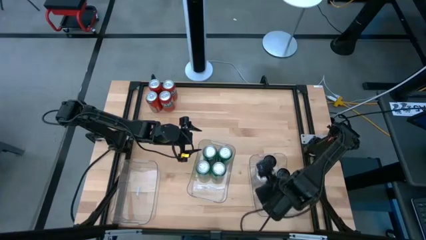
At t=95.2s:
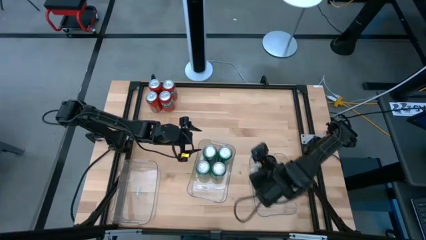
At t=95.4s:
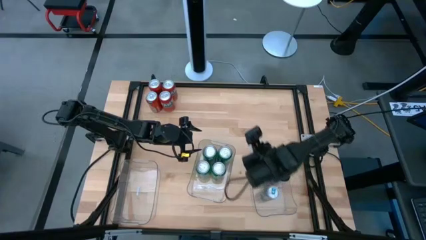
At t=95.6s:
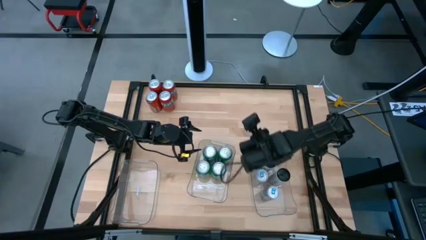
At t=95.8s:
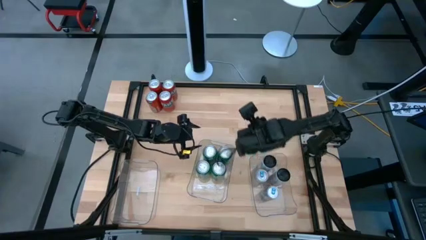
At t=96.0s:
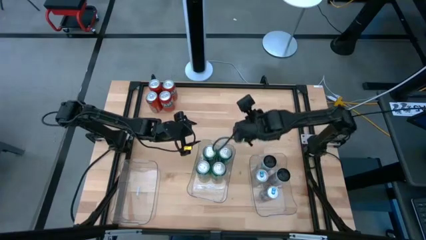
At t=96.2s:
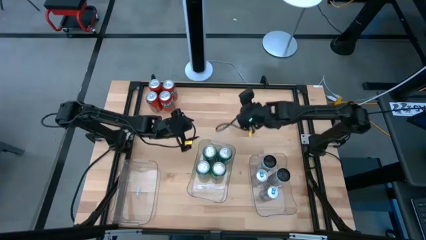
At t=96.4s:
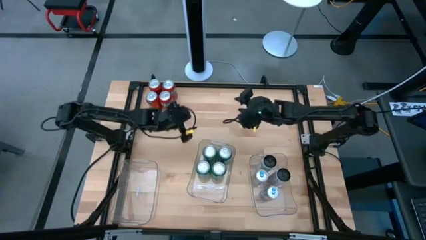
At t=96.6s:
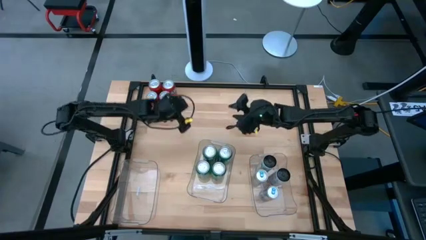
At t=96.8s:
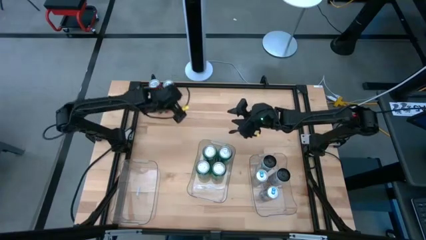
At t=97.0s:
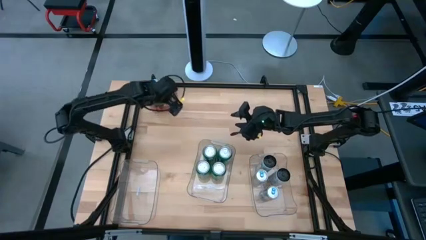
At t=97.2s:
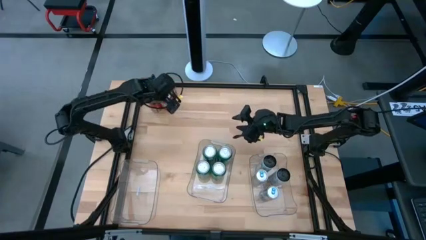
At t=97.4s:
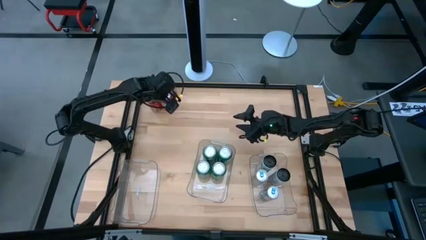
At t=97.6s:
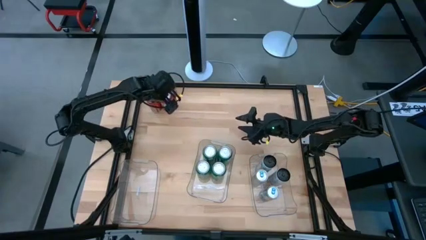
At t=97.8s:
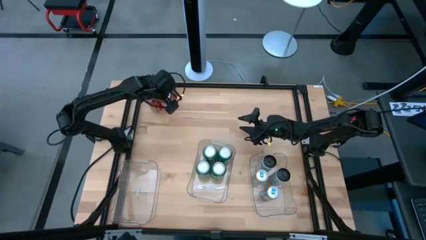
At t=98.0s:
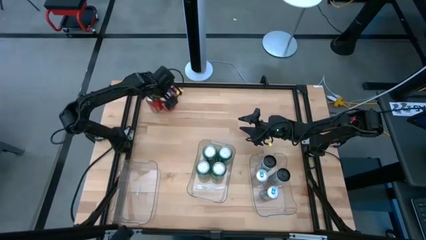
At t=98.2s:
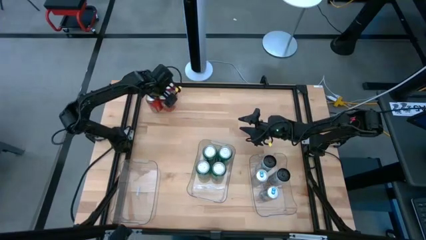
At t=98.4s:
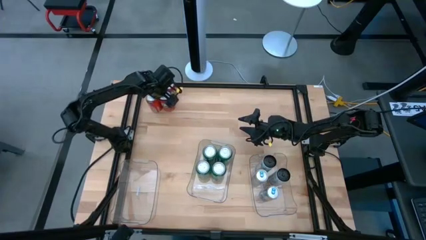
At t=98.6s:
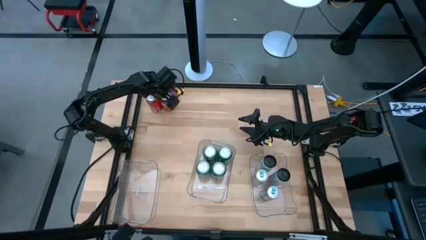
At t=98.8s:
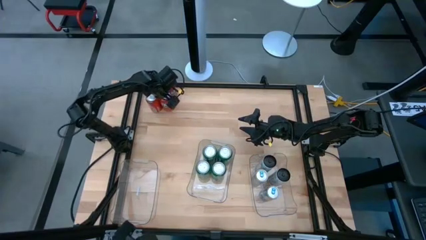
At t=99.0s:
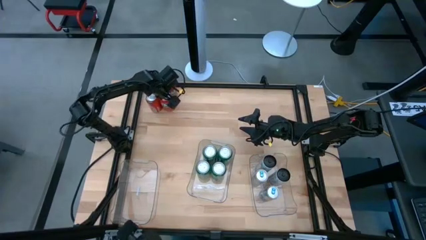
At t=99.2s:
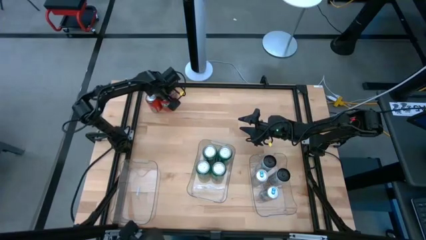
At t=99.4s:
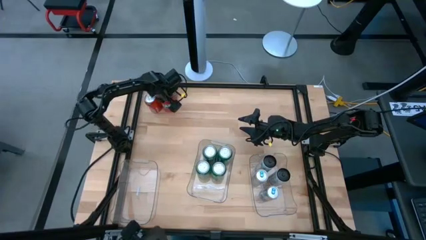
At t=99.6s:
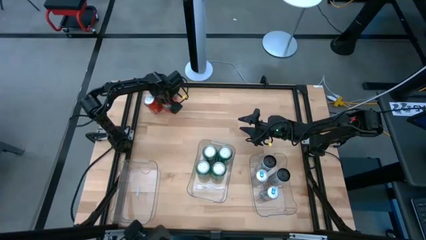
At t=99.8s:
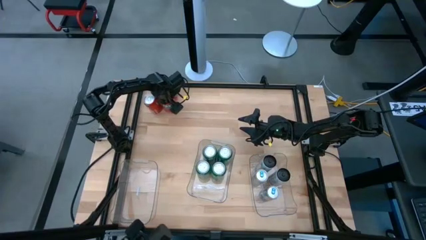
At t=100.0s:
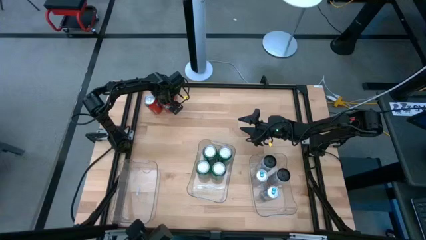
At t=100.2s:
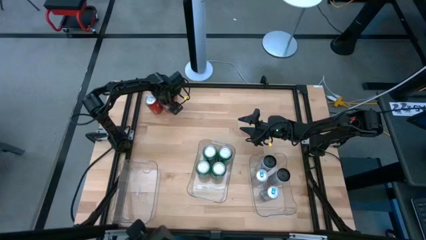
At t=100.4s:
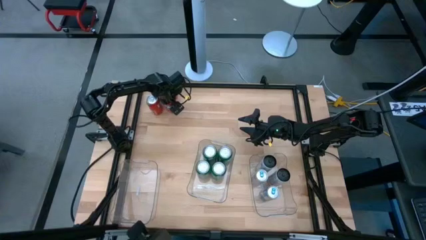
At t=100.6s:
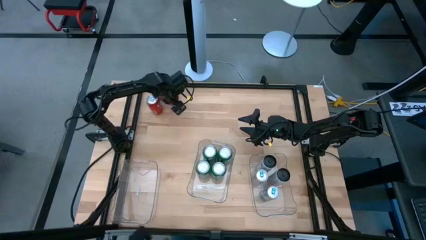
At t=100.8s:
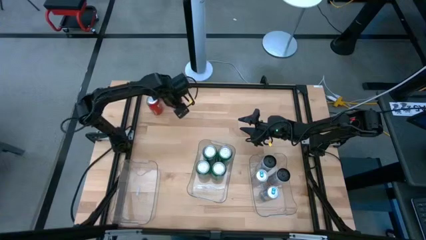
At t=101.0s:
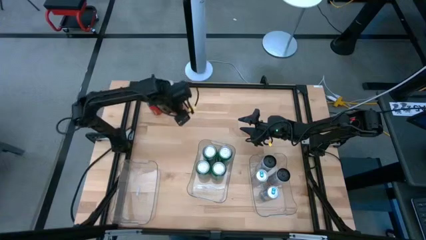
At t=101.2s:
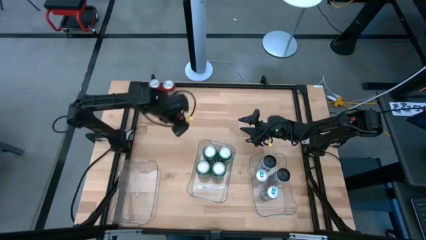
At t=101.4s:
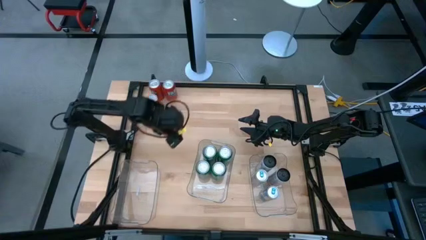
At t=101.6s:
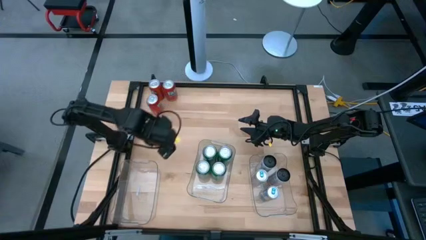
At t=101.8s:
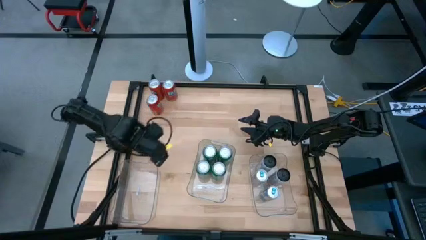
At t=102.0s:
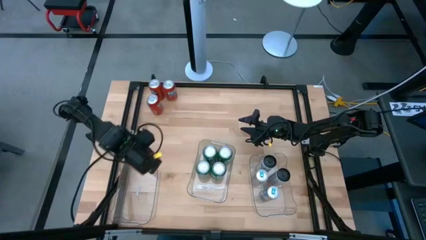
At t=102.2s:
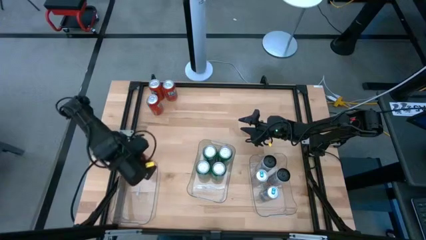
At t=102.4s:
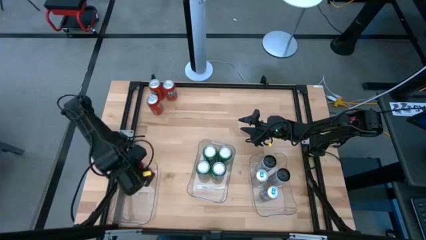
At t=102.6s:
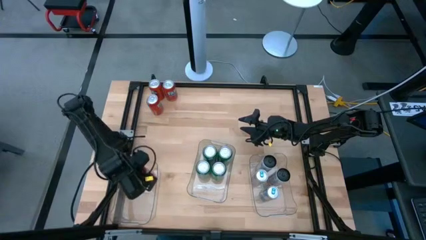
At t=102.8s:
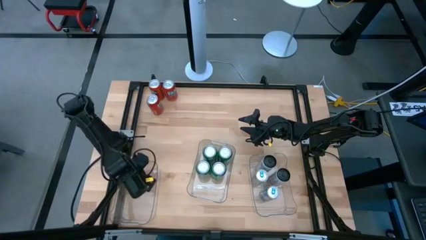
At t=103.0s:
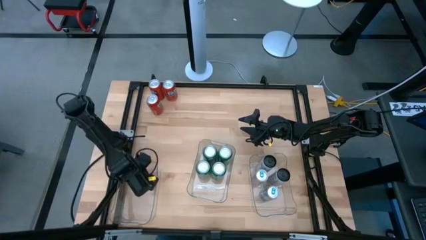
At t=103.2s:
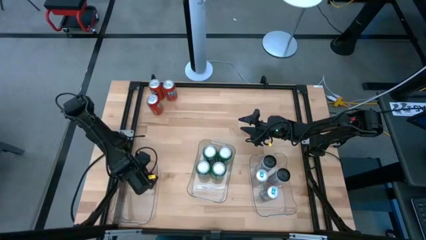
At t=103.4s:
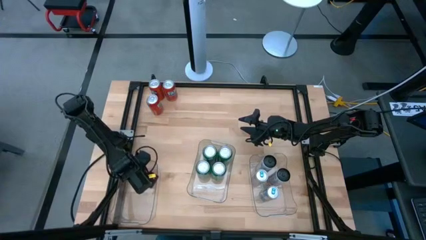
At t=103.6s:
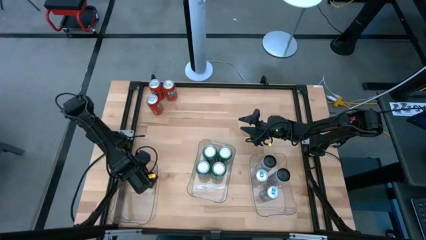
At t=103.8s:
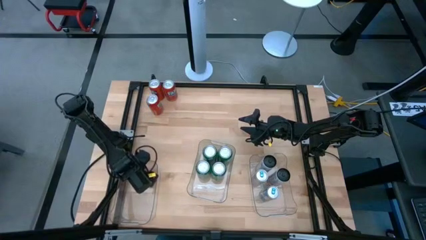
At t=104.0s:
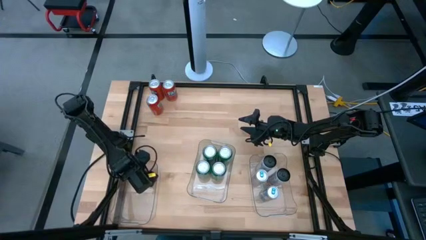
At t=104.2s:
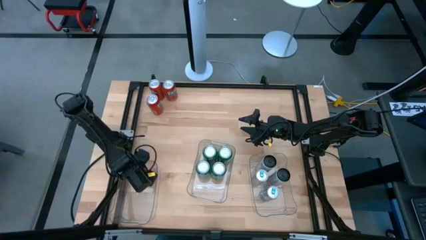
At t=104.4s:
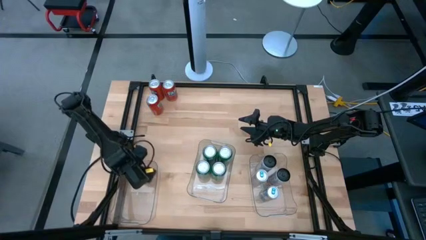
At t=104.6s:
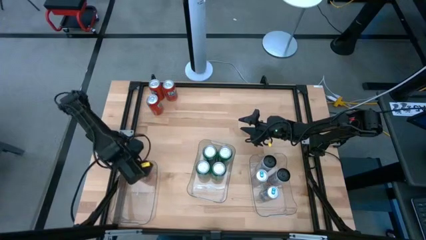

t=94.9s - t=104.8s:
Task: Sort soda cans
Put the red soda can into the left transparent bin

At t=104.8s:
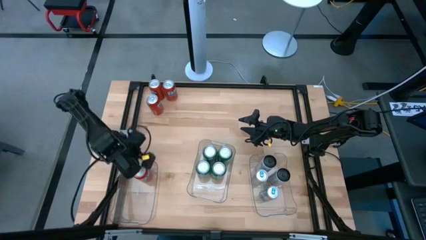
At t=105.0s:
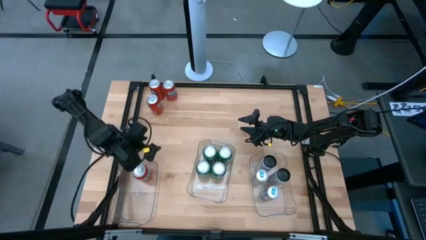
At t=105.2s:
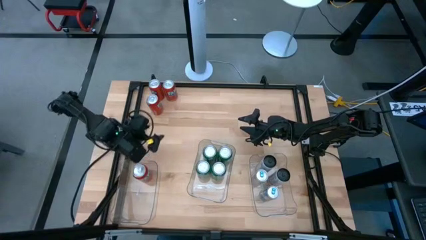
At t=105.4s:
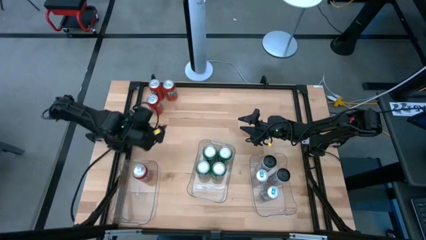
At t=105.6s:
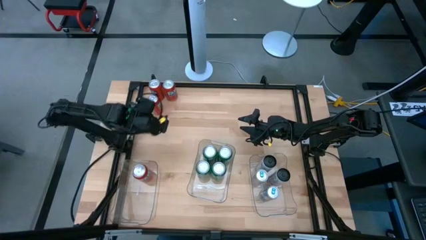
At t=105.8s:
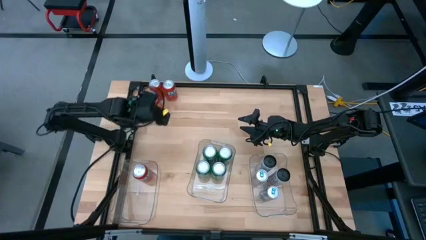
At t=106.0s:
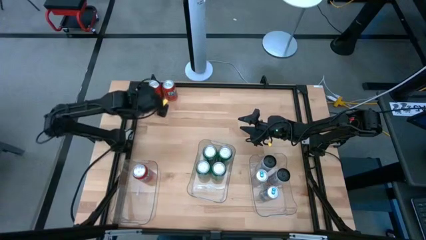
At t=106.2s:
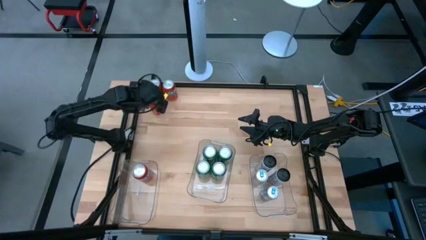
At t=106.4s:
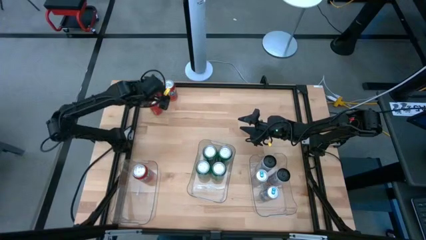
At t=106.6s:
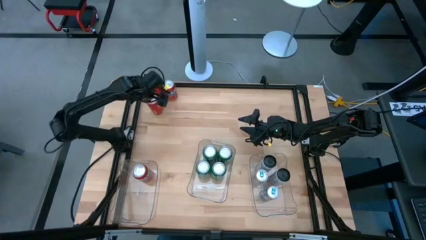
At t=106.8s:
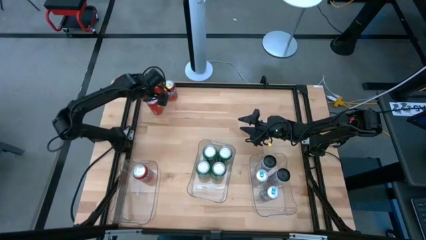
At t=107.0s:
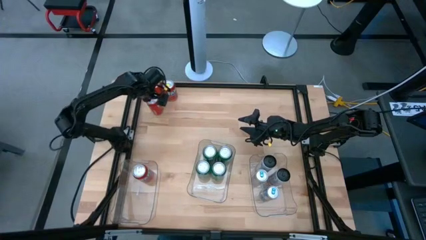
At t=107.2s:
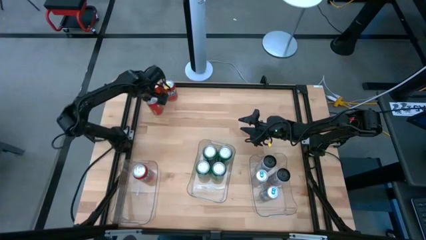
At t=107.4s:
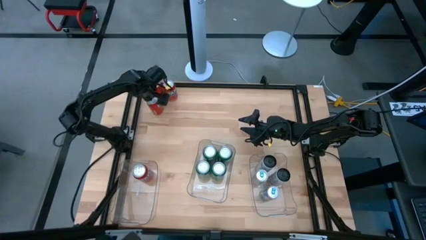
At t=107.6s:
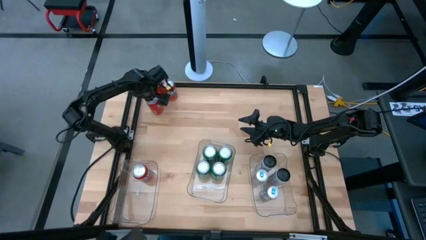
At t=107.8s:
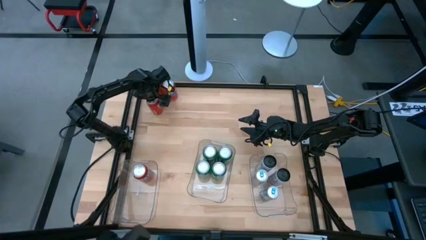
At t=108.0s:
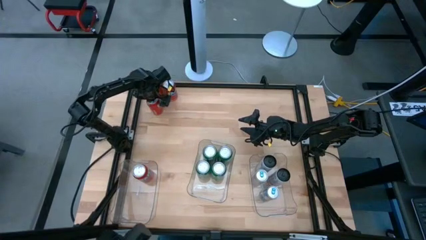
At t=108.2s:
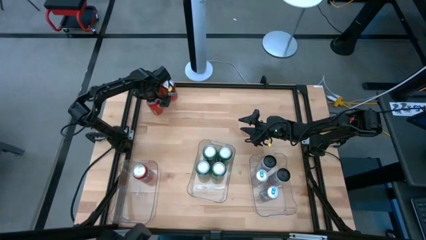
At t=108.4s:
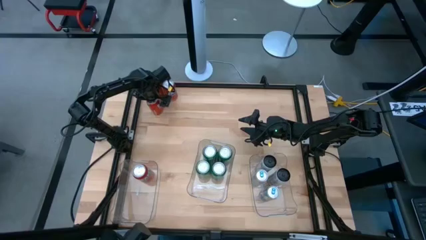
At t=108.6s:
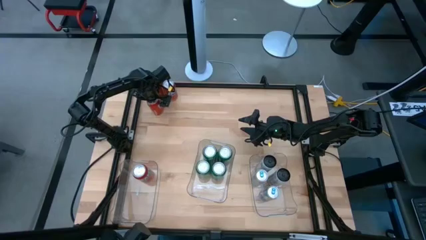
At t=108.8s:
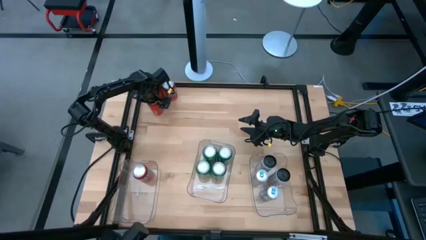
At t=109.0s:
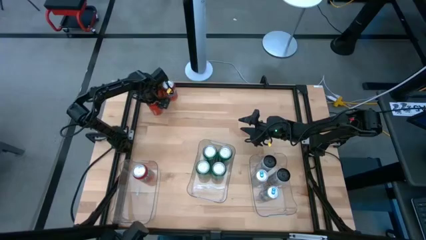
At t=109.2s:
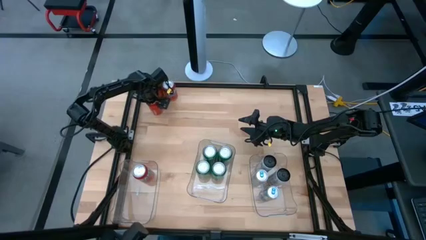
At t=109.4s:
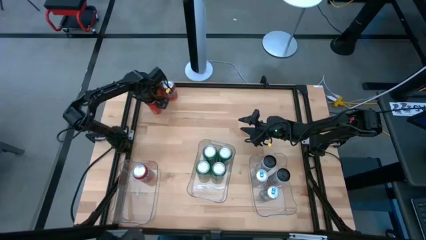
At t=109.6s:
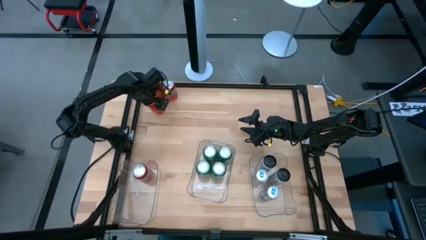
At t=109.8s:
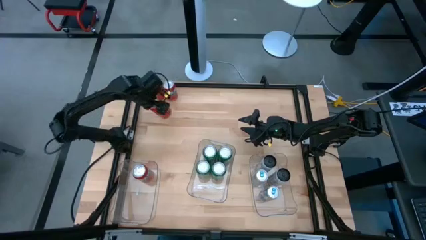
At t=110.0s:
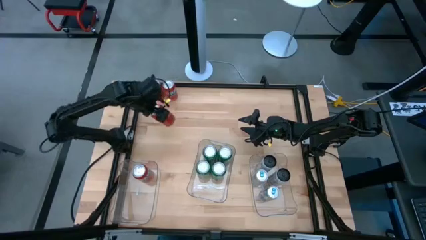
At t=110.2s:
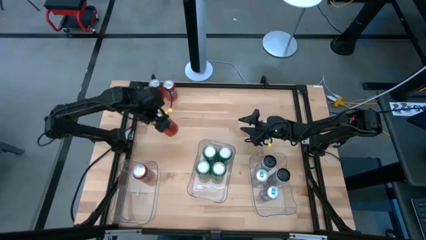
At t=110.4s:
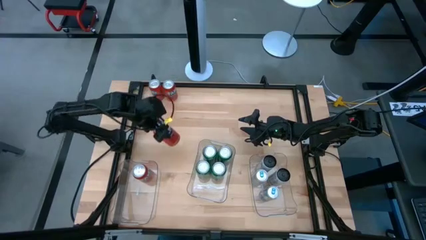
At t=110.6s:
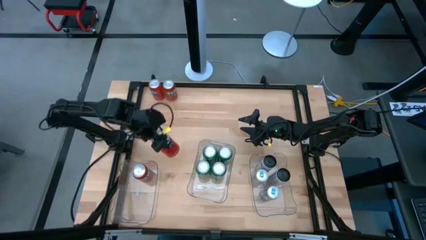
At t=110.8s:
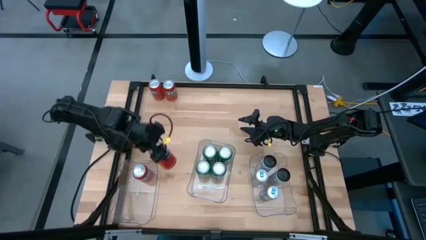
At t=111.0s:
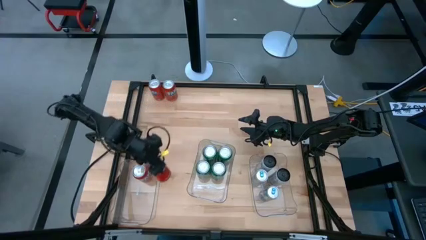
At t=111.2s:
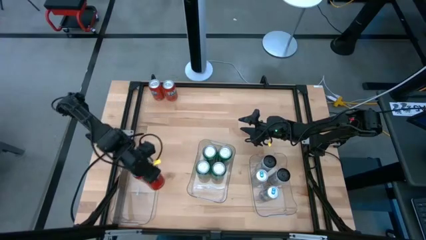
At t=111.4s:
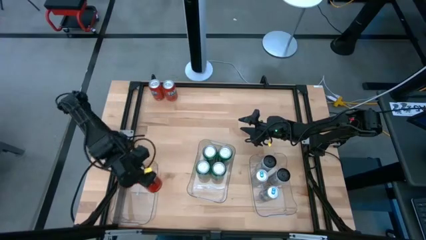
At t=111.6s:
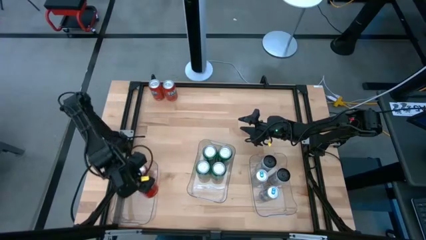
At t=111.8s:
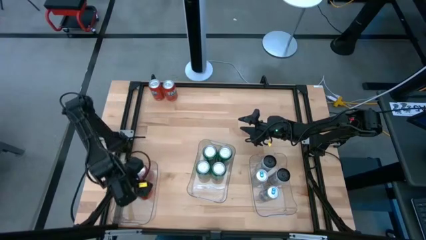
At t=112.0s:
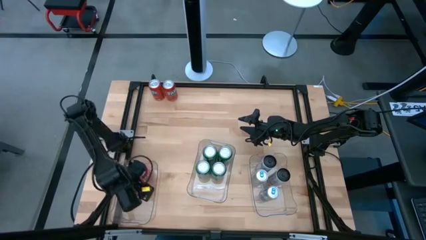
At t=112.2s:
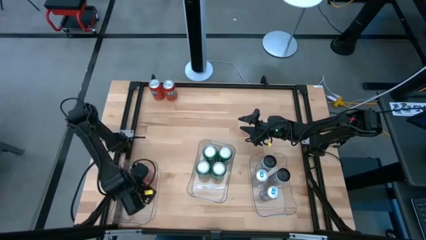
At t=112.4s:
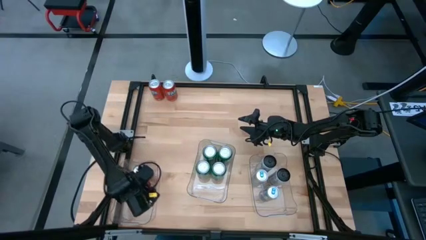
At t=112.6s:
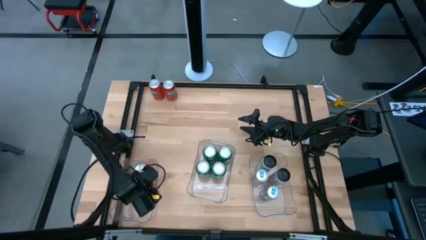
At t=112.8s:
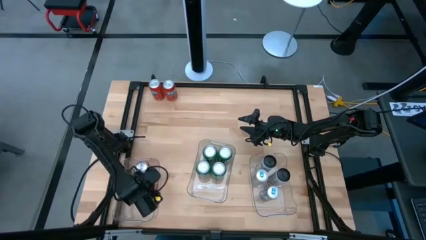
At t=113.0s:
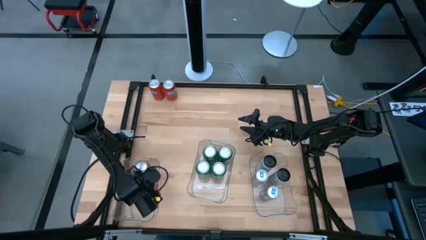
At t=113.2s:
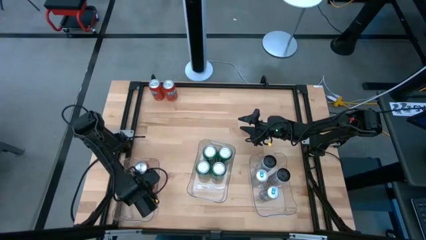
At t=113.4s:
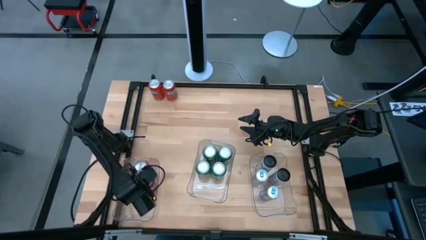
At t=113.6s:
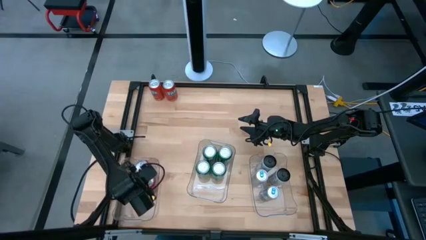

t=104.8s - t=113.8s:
Put the red soda can into the left transparent bin
